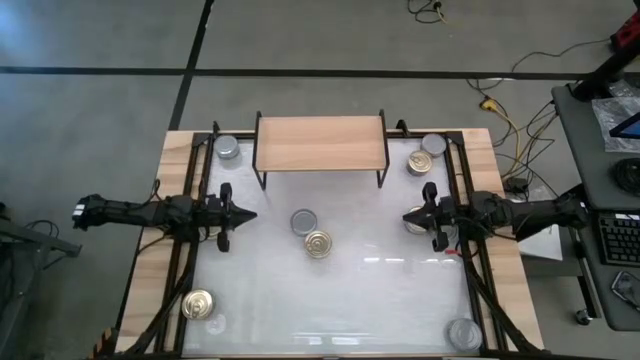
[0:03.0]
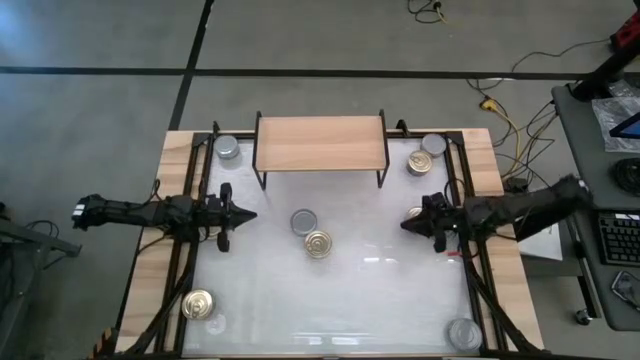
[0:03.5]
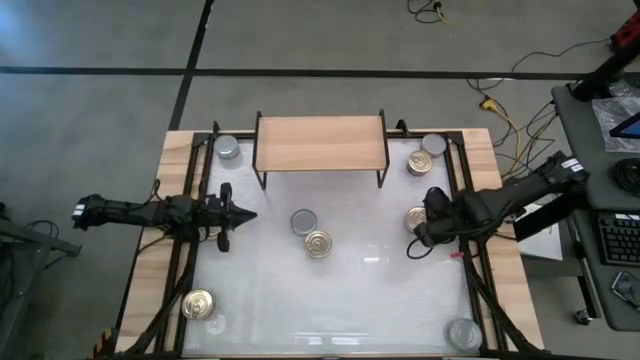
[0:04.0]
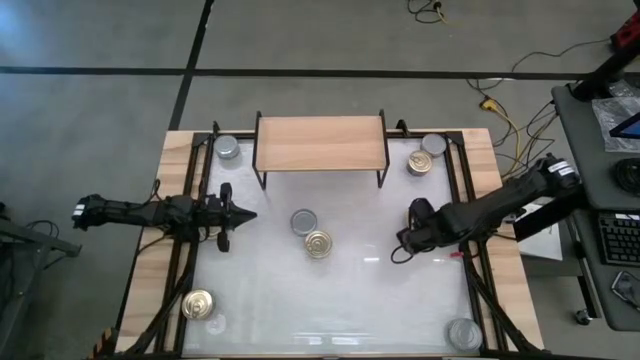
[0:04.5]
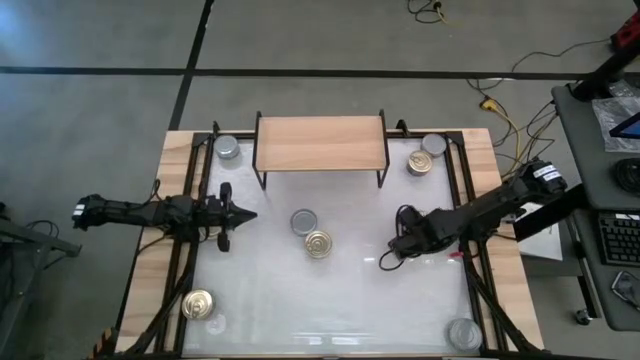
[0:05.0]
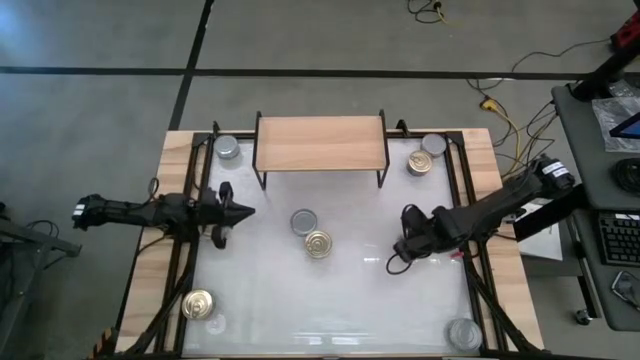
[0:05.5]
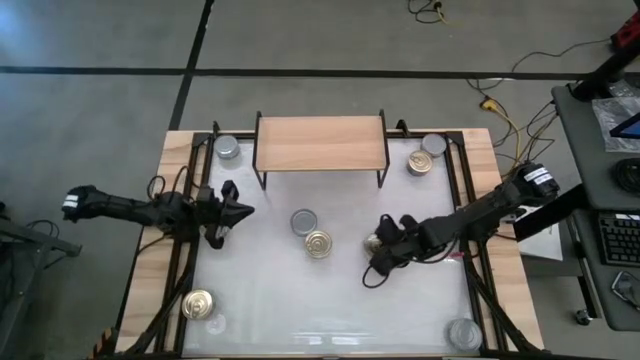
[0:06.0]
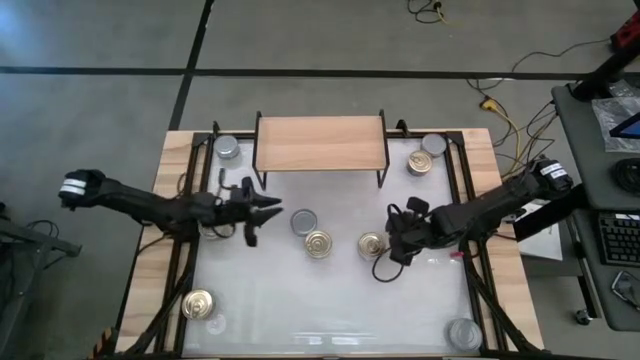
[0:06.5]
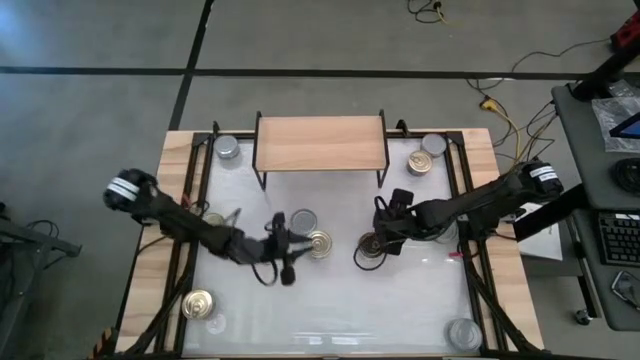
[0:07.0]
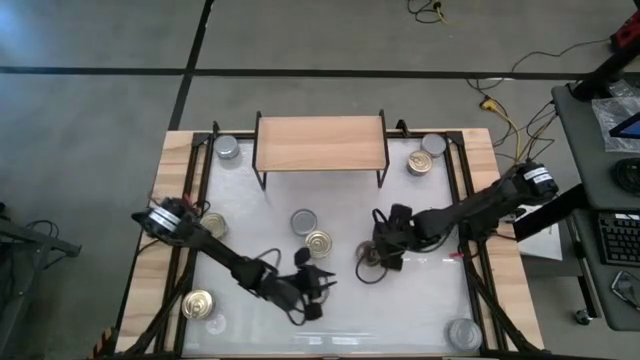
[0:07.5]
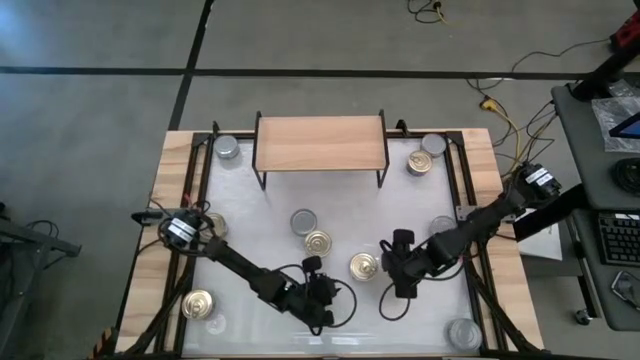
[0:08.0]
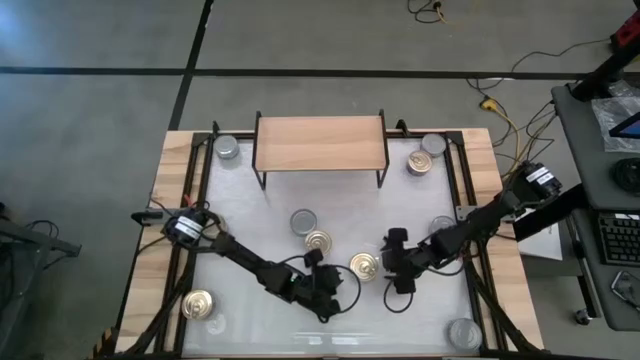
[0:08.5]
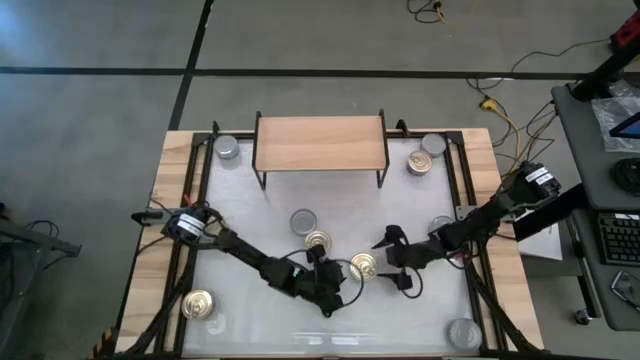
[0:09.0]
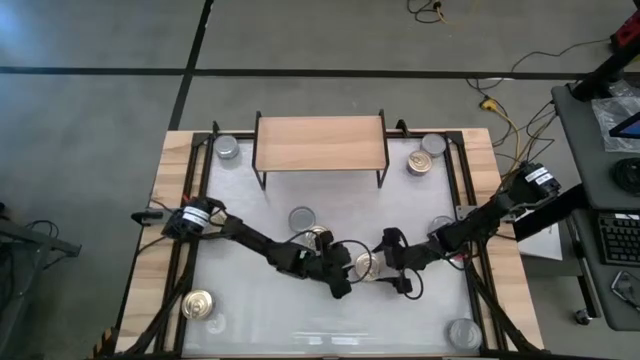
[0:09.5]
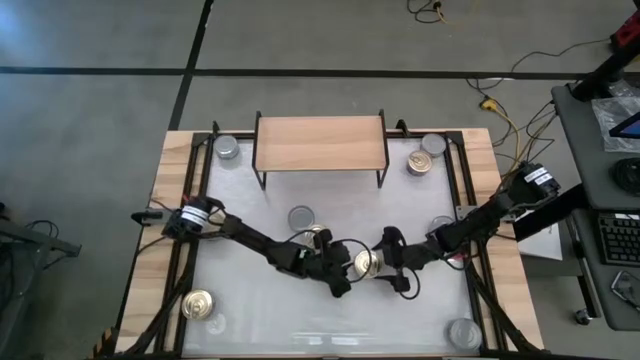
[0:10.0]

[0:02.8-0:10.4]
Task: Stack canned seafood by type on shelf
Put the blue-pink tuna can on the shelf

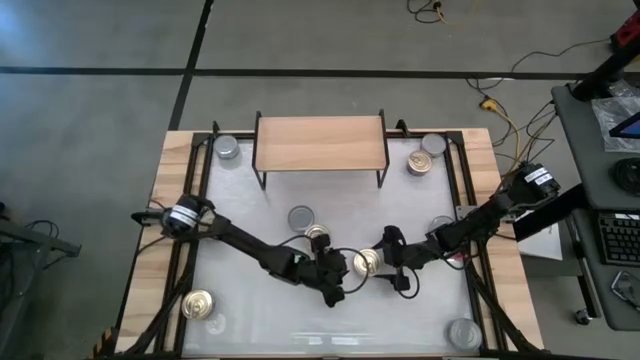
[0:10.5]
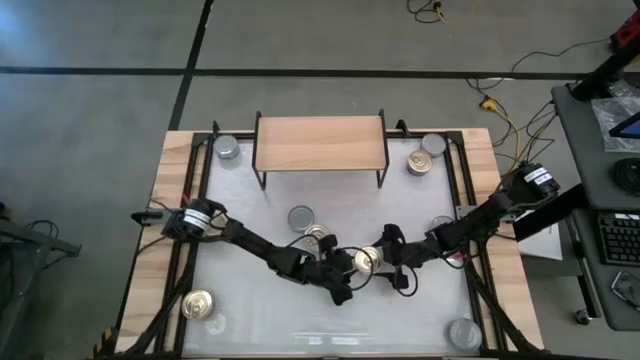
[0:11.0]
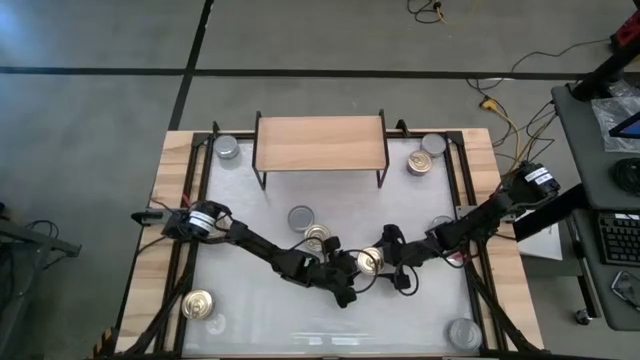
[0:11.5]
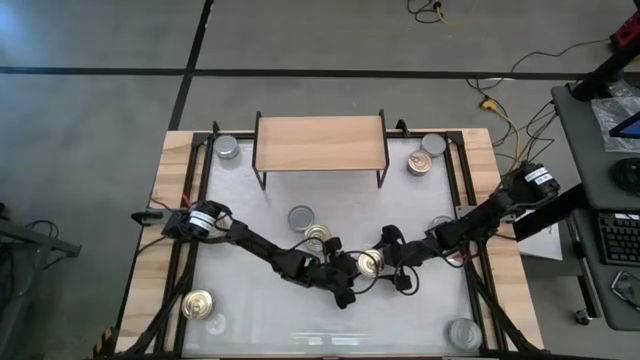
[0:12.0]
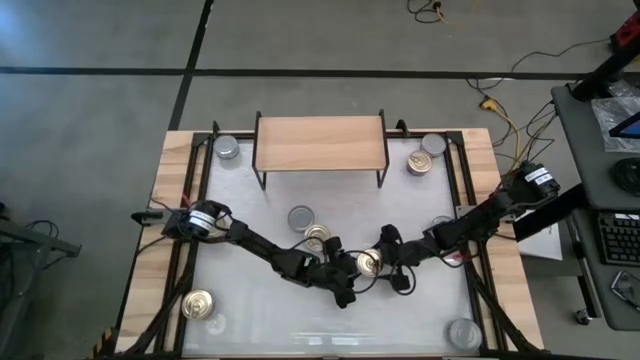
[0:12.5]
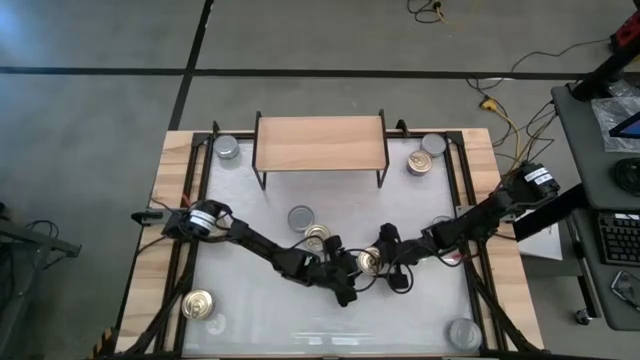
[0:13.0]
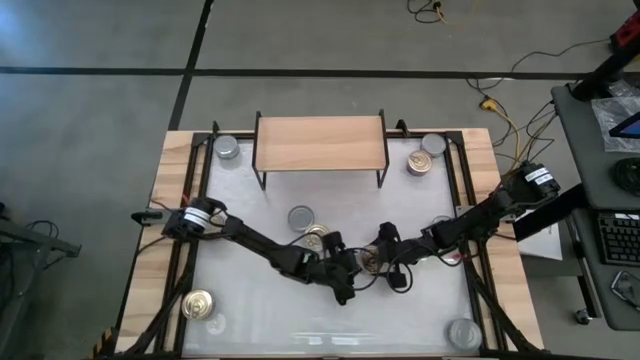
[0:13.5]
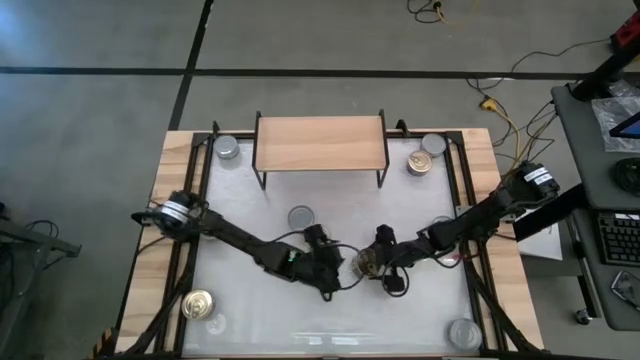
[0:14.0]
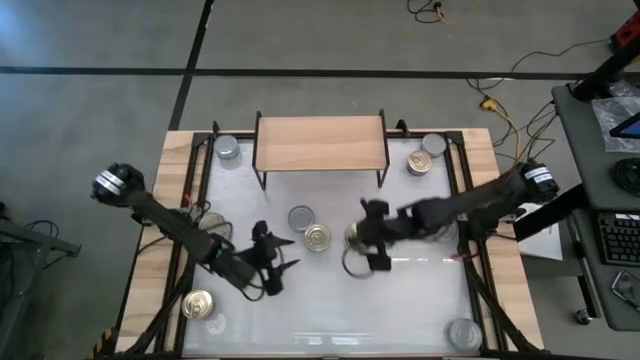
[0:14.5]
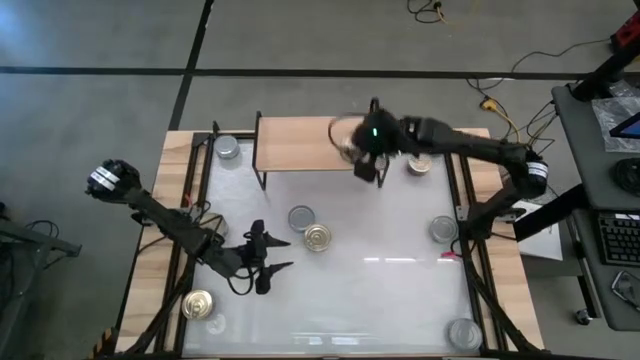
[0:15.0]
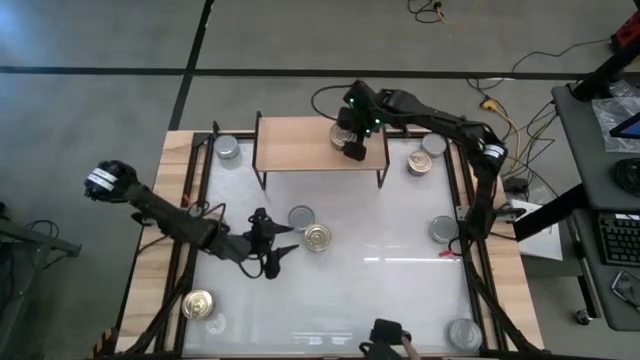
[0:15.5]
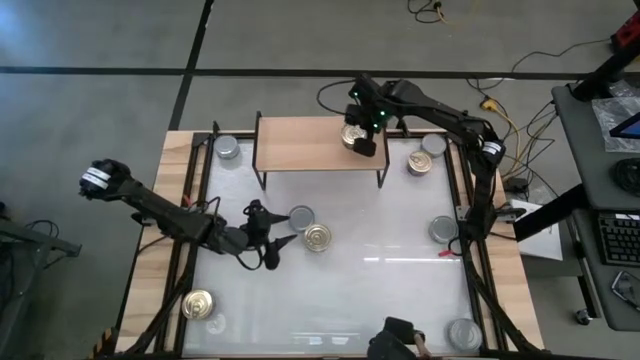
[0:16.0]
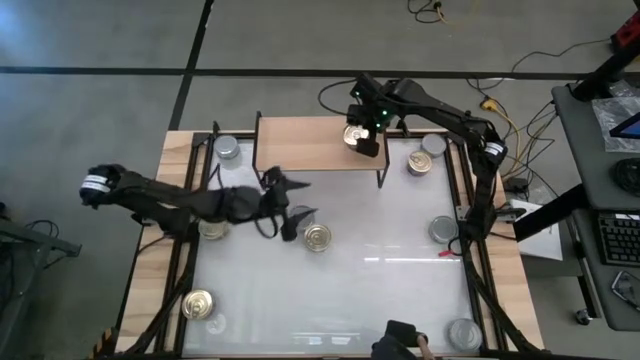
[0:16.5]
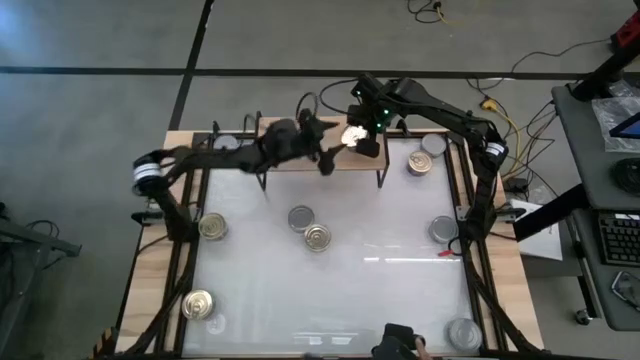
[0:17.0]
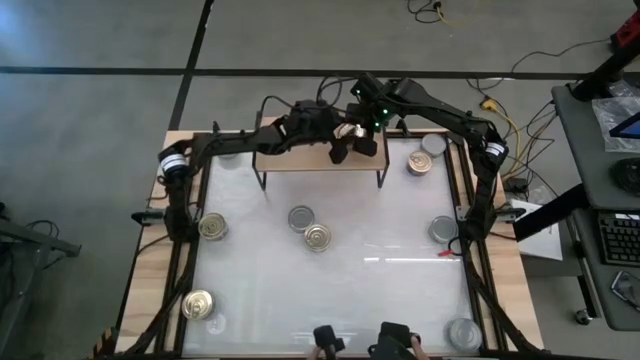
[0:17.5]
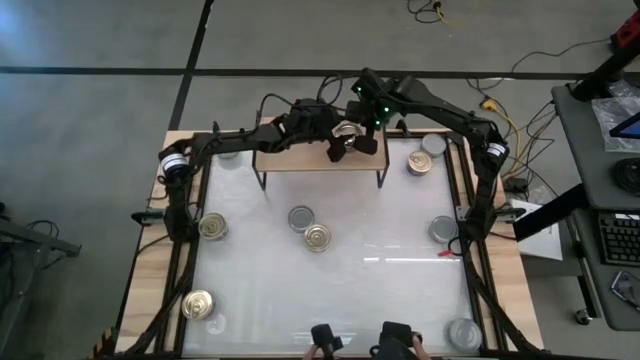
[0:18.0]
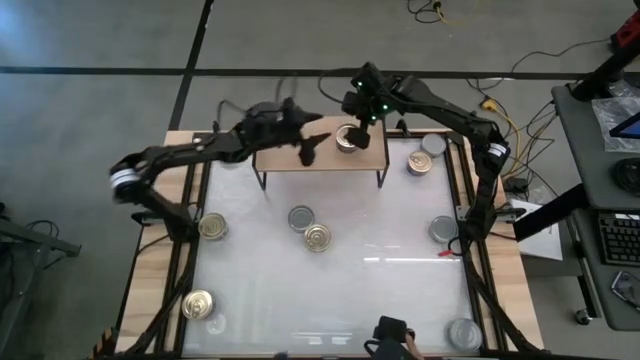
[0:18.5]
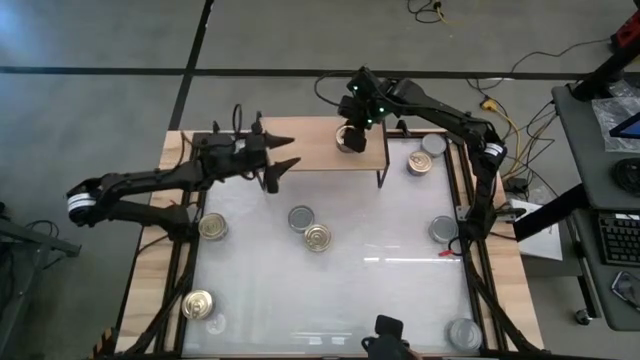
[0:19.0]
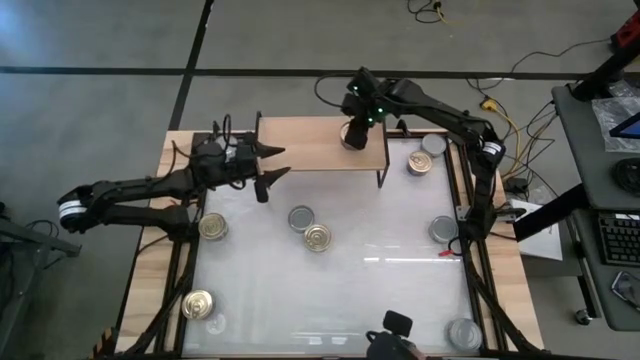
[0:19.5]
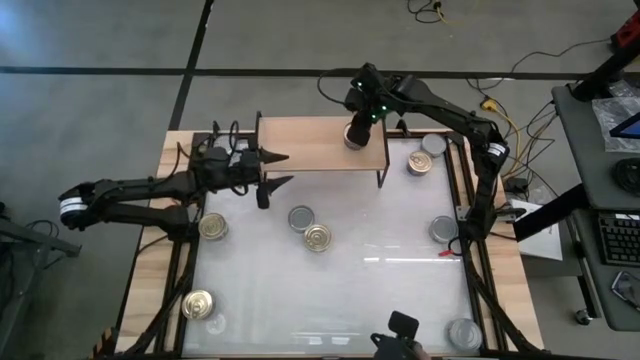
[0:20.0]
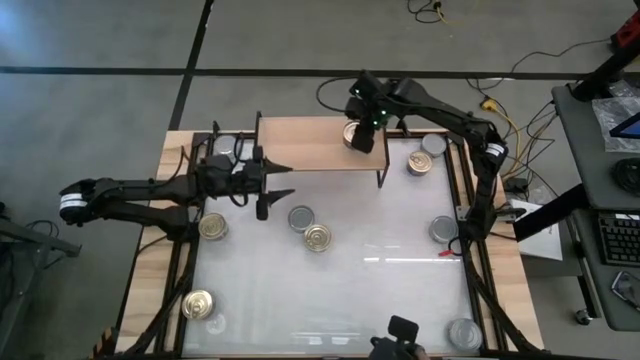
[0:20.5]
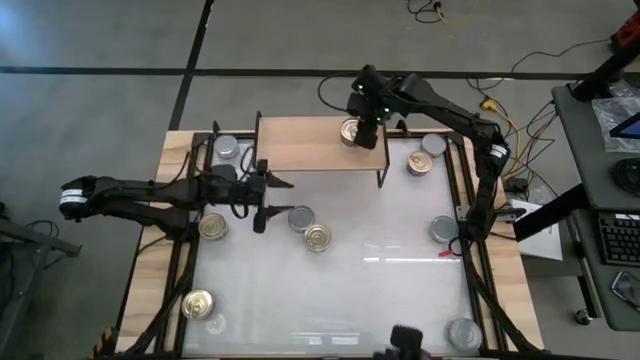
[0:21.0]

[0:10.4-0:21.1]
Put the blue-pink tuna can on the shelf

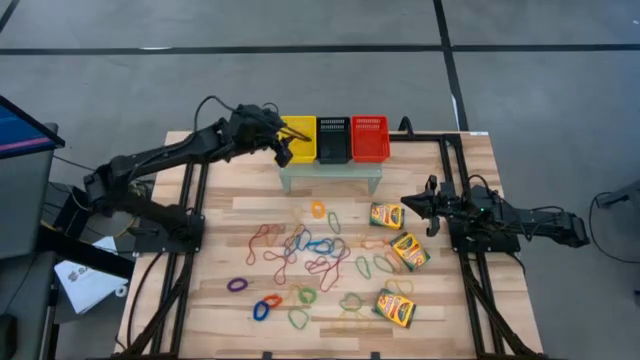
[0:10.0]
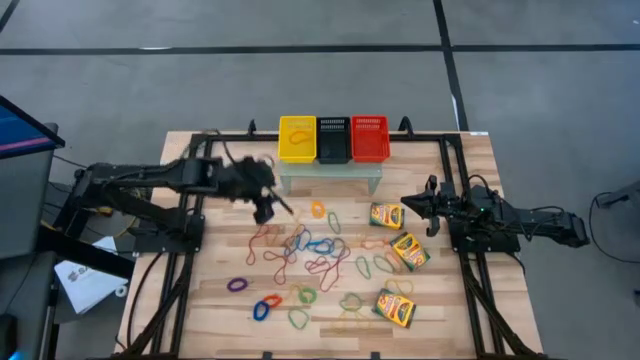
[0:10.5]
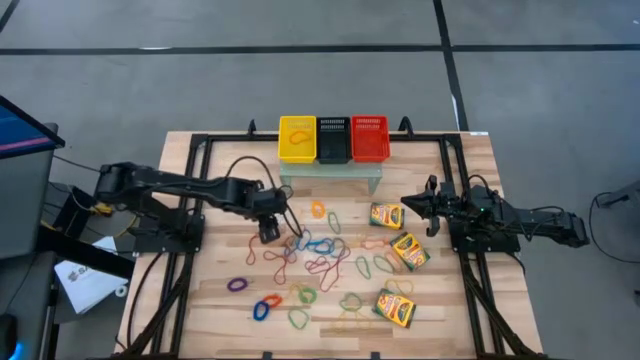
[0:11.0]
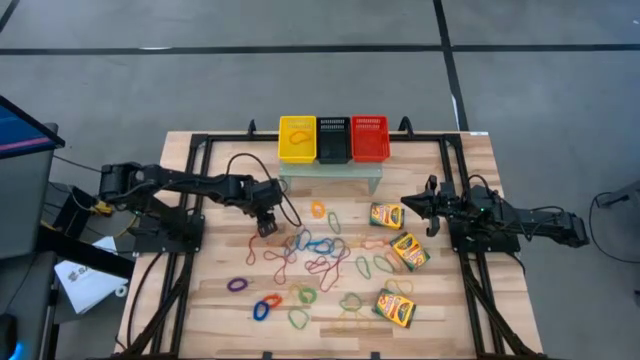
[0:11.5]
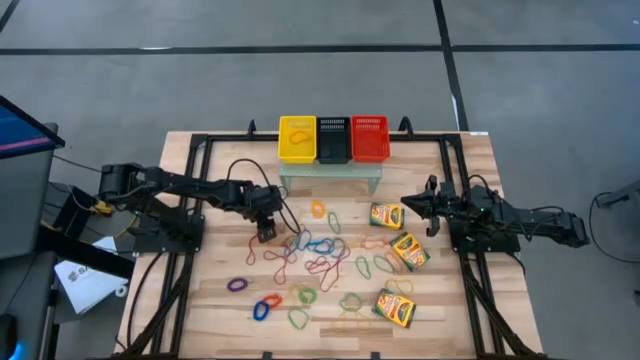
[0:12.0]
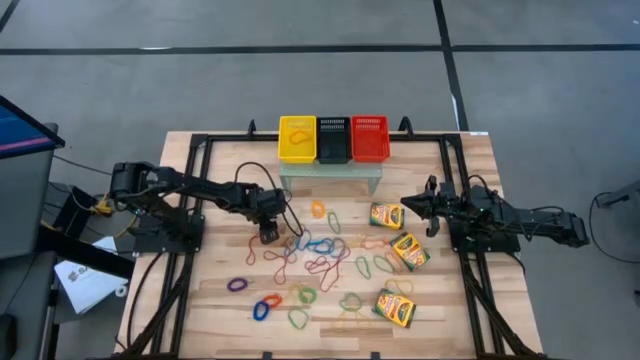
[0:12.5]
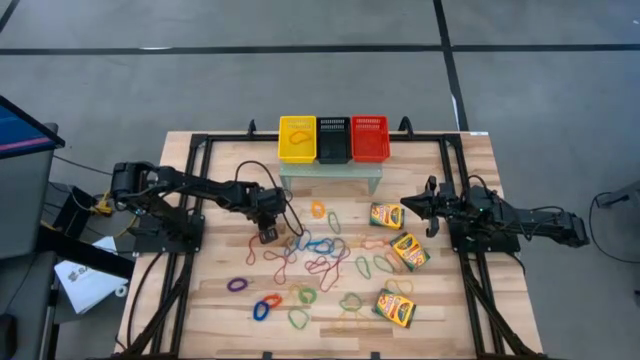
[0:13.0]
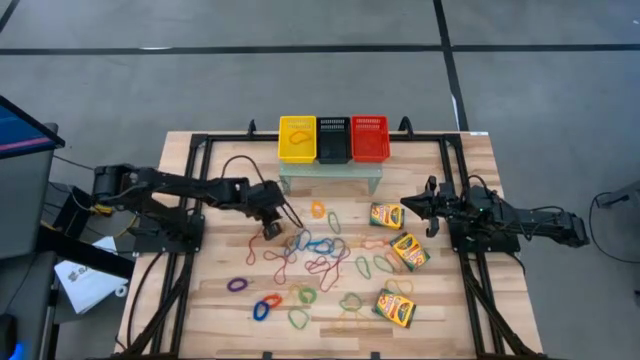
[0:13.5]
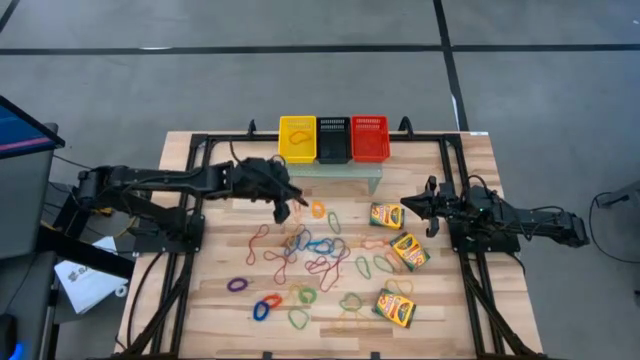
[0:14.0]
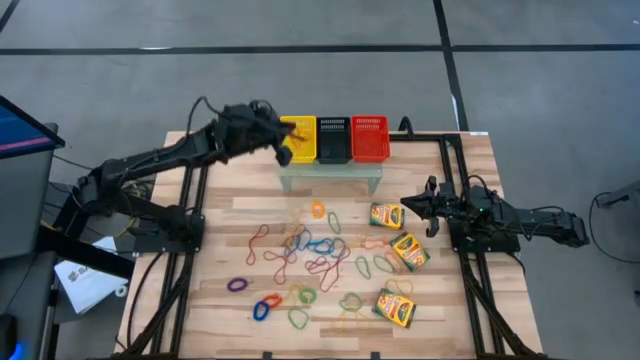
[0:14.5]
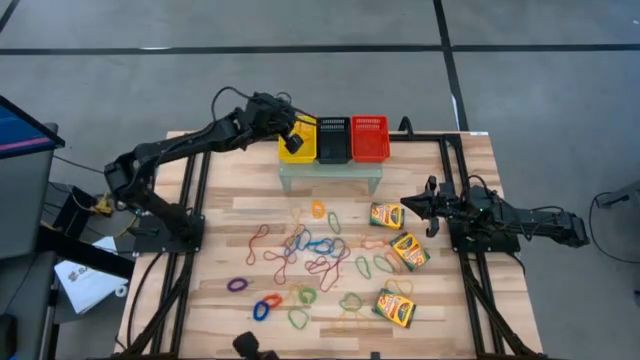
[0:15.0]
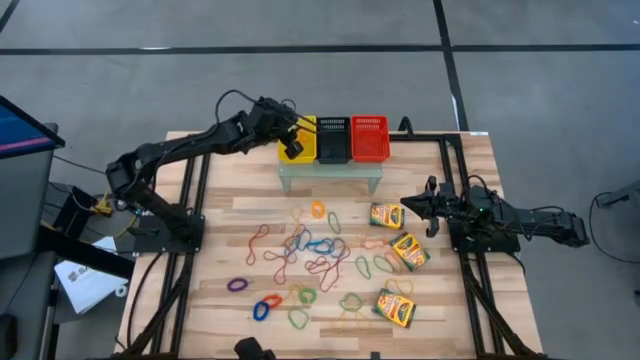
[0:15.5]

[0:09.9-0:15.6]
Task: Pick & Place Office Desk Supplies
Put the small orange rubber band into the yellow bin on the shelf
